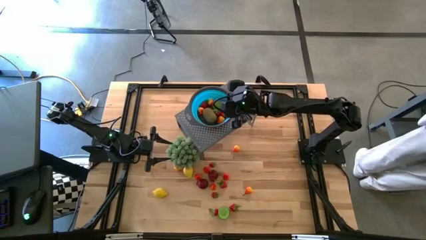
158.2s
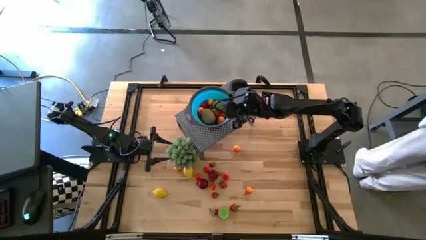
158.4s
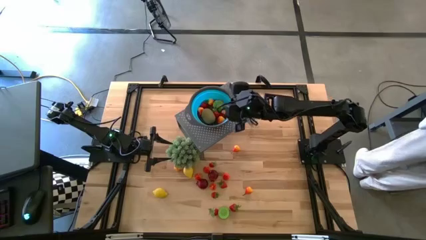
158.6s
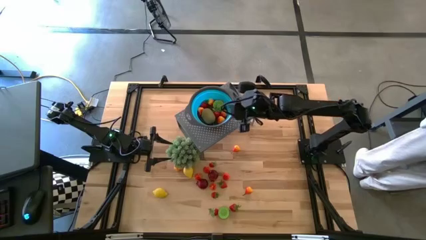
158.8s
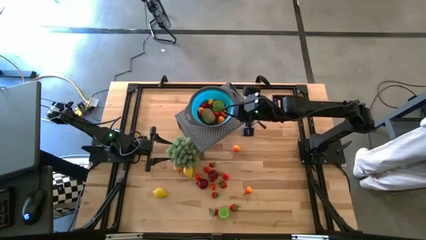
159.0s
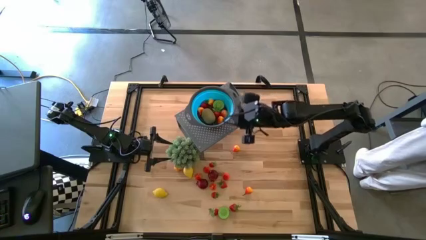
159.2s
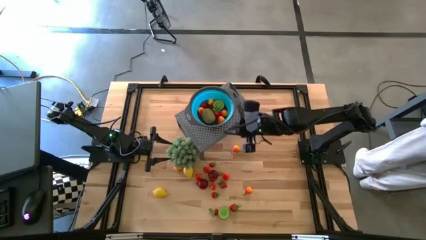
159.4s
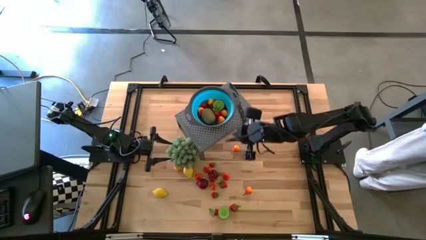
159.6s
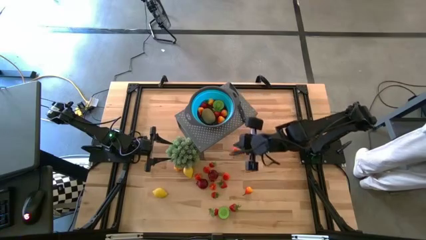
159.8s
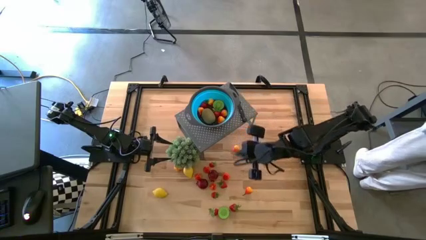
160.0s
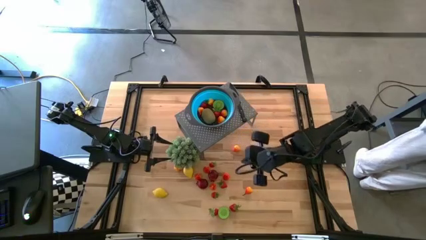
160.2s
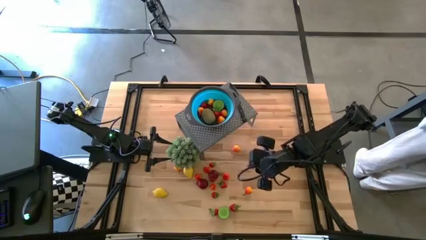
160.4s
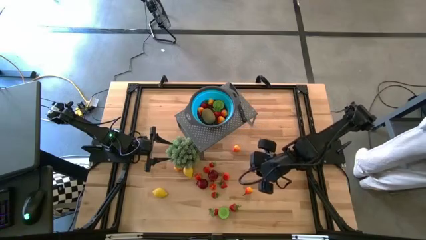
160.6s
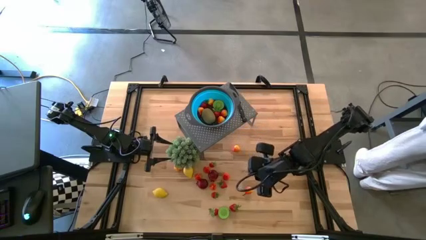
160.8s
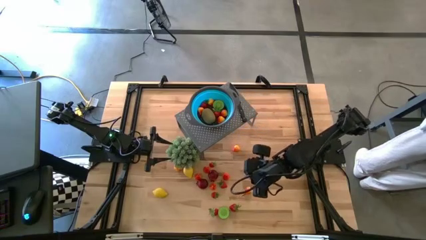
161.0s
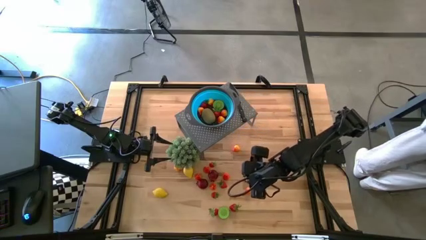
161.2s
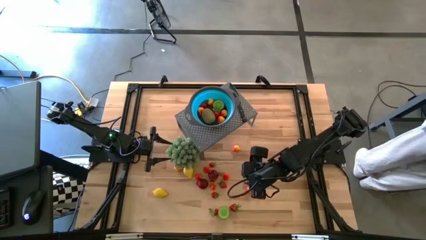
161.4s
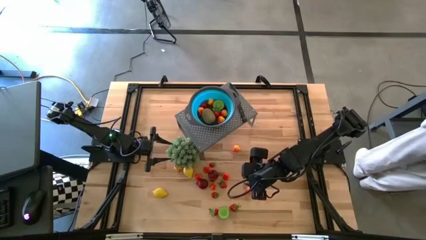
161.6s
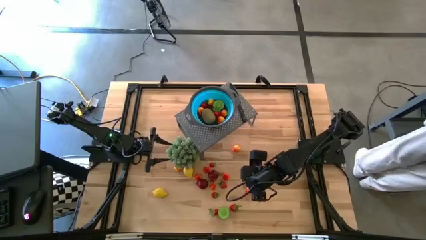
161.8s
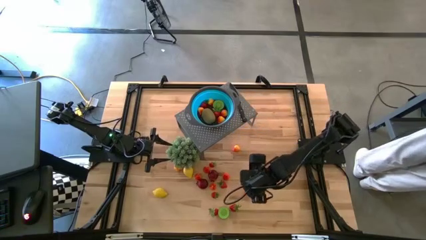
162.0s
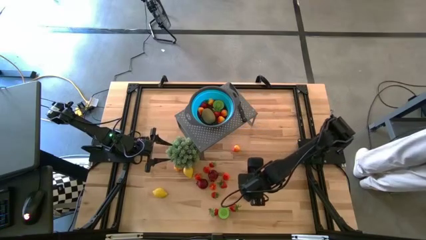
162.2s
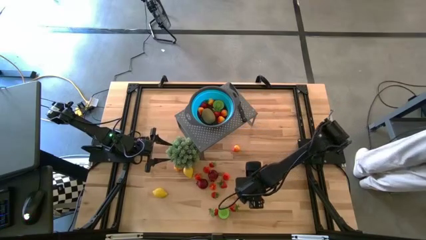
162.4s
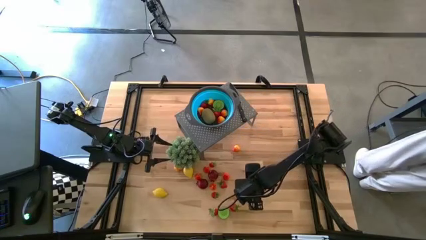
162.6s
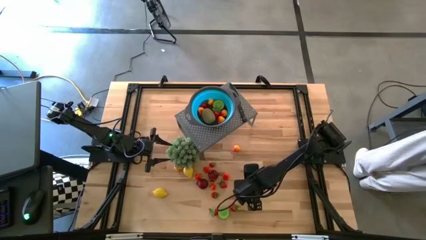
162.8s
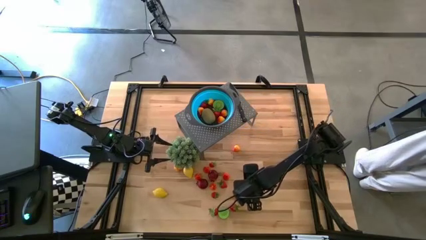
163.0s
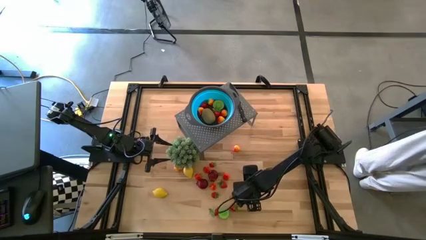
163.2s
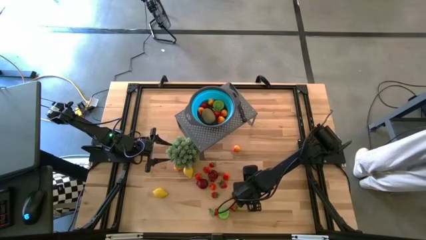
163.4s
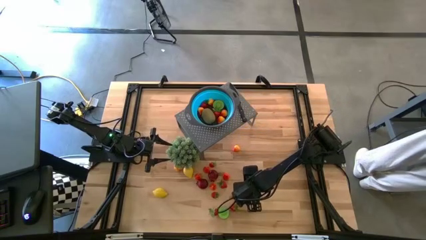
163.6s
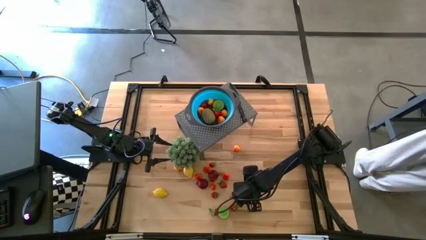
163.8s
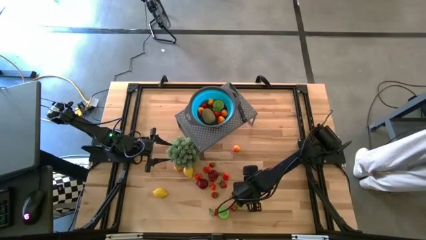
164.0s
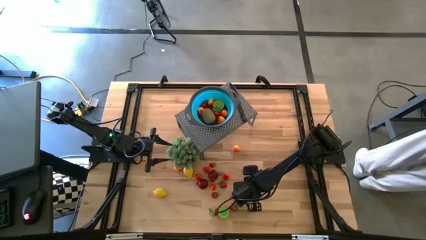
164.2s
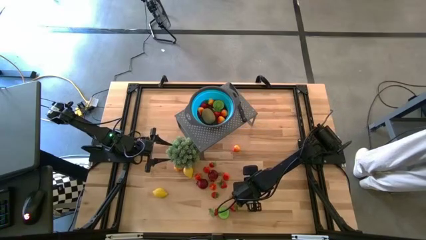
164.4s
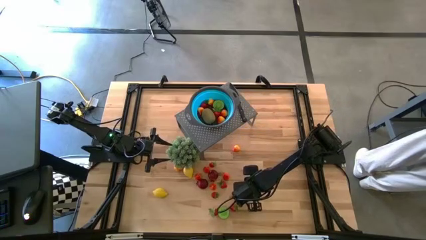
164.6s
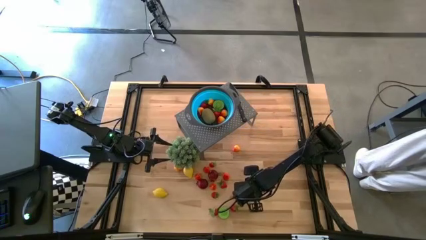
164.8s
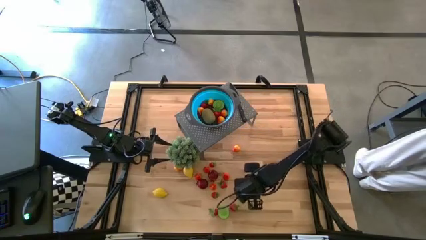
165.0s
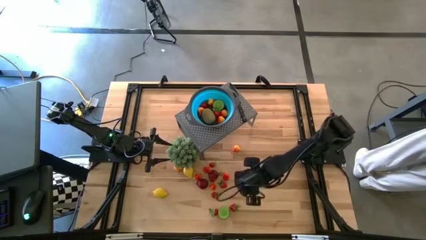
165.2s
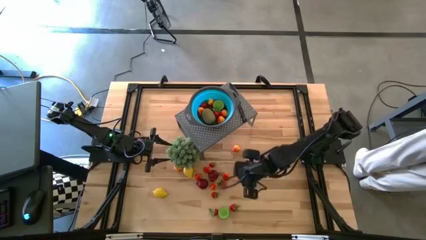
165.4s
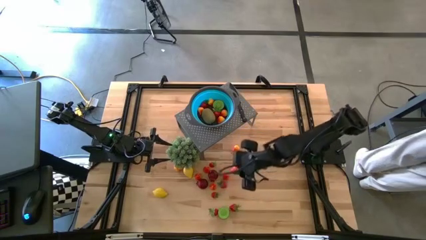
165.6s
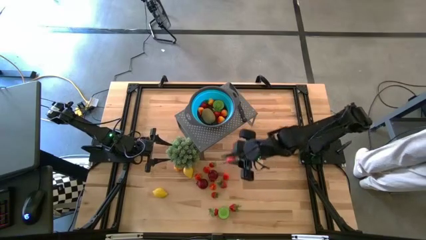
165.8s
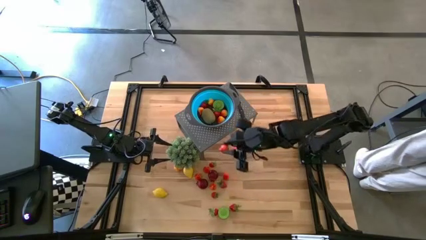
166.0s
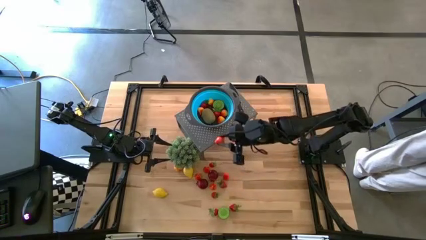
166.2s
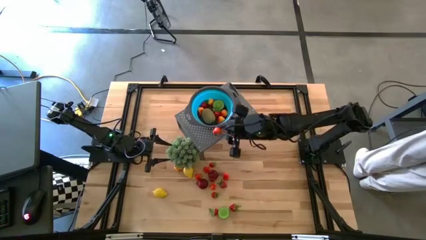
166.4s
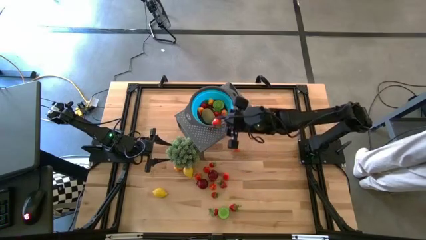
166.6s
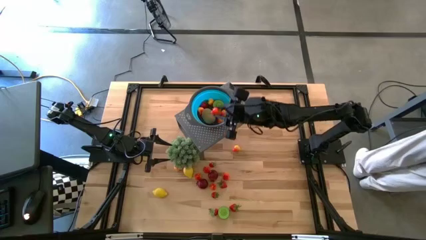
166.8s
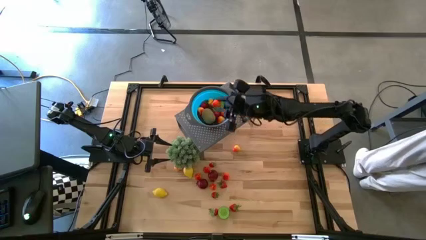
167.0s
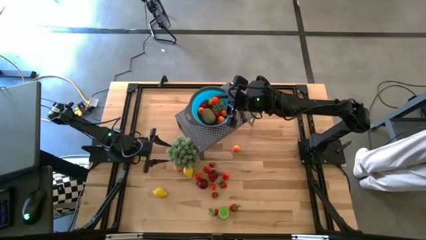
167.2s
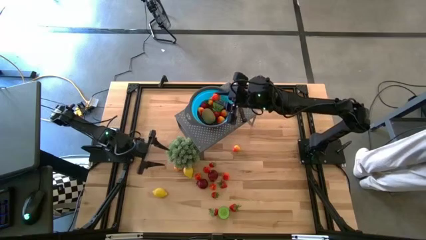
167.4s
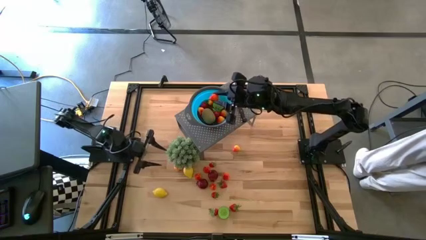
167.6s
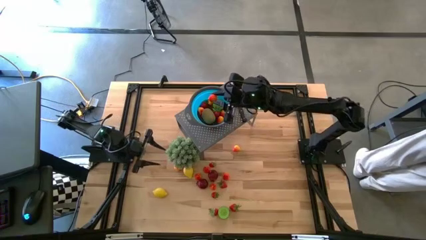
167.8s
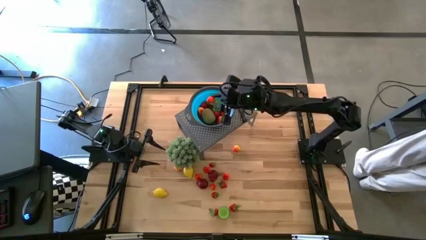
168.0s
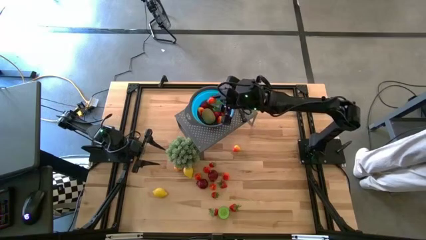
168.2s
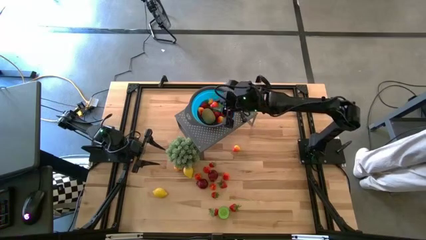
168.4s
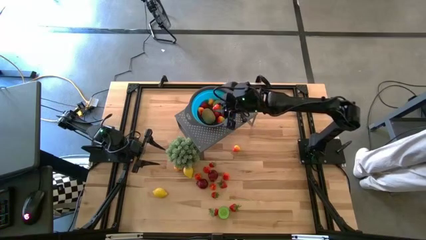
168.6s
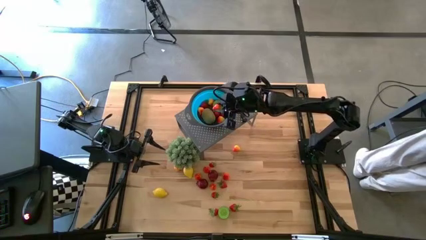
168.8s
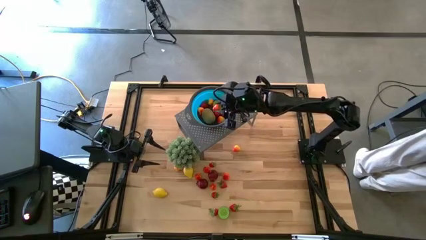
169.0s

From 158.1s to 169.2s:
Task: Pick & Place Fruit
Put the pear into the blue strainer bowl on the shelf
